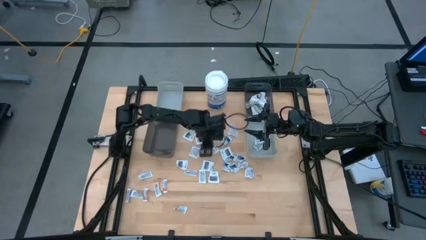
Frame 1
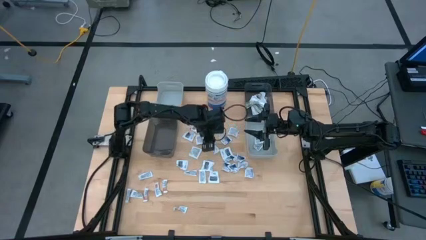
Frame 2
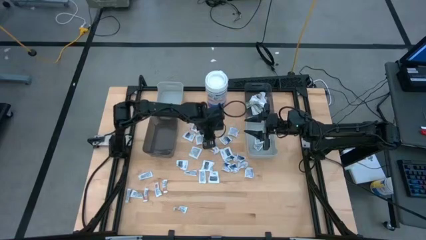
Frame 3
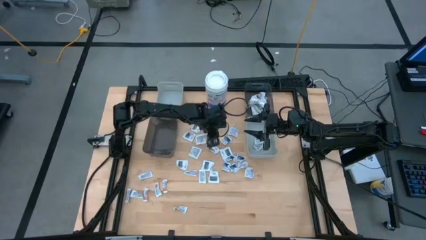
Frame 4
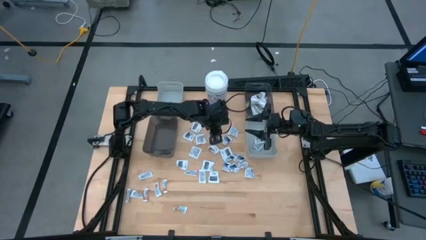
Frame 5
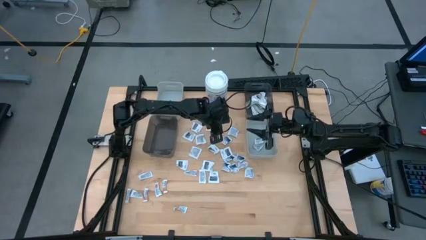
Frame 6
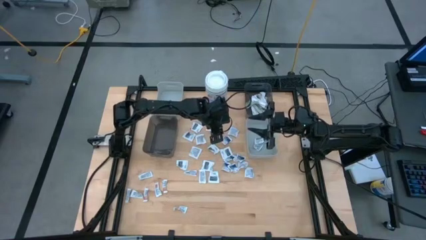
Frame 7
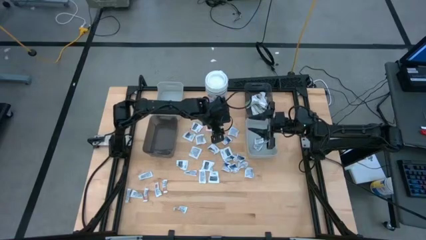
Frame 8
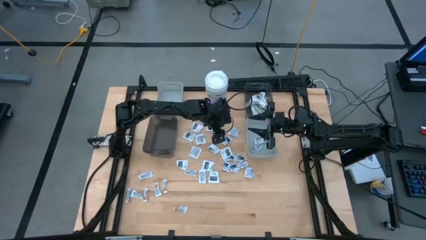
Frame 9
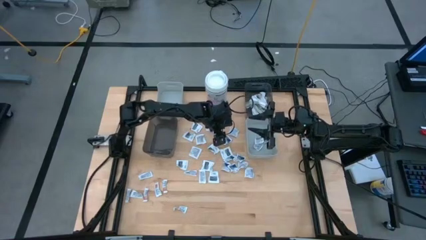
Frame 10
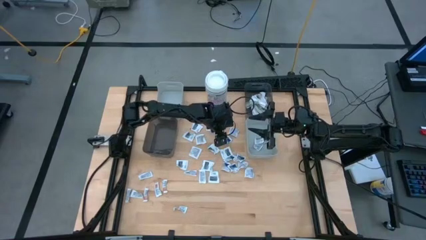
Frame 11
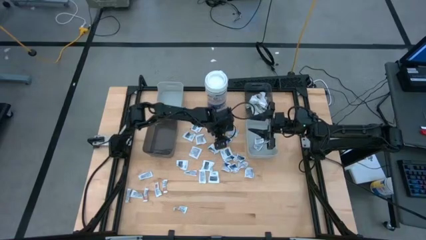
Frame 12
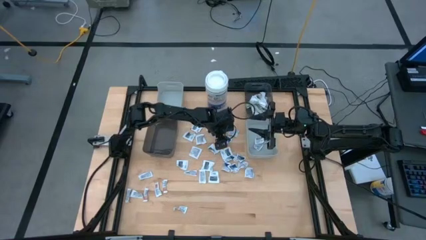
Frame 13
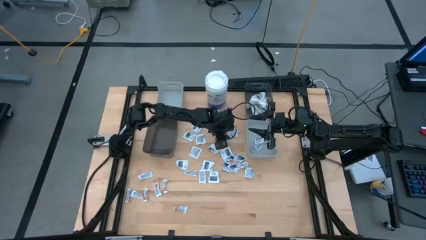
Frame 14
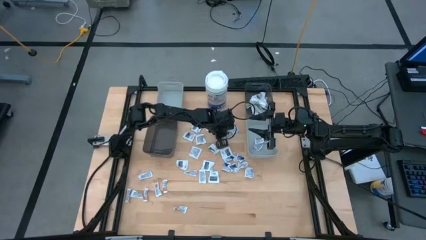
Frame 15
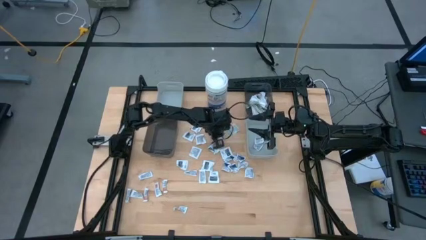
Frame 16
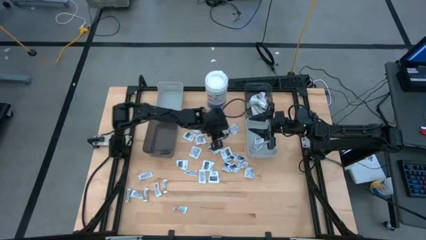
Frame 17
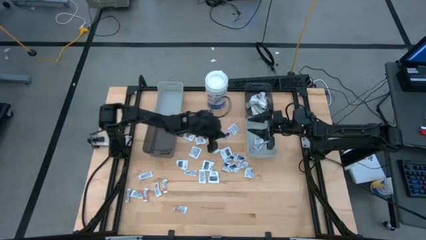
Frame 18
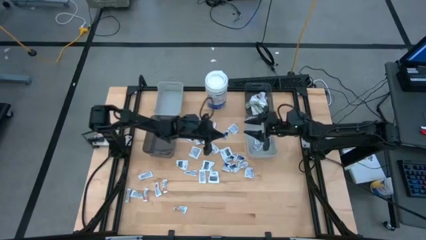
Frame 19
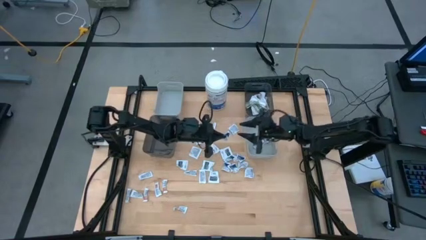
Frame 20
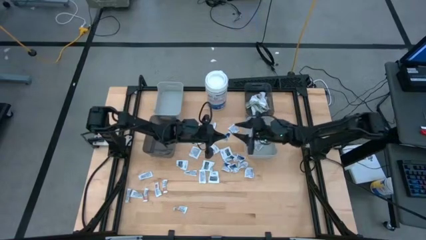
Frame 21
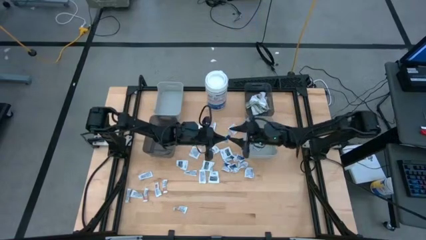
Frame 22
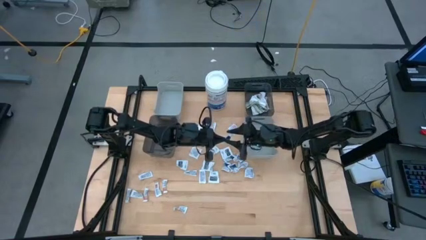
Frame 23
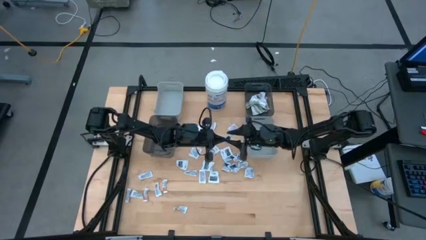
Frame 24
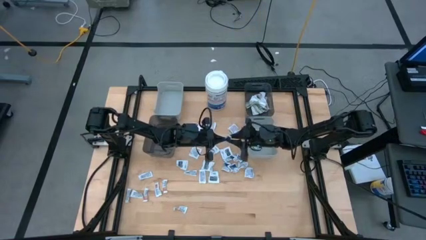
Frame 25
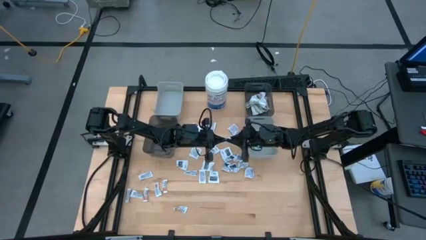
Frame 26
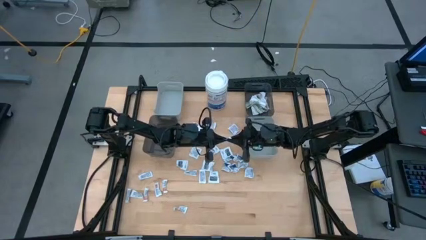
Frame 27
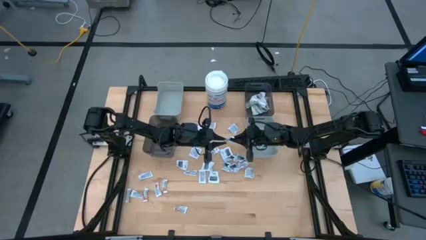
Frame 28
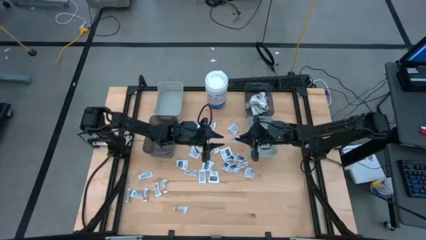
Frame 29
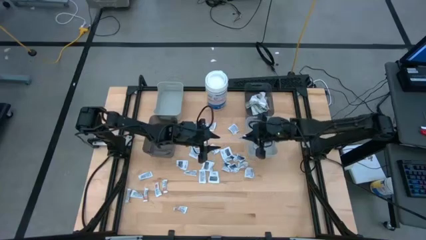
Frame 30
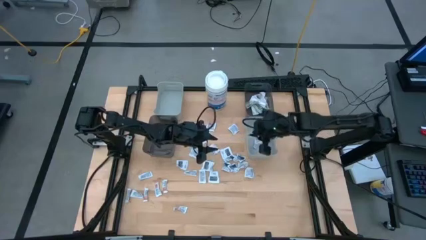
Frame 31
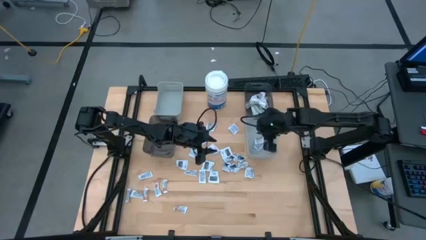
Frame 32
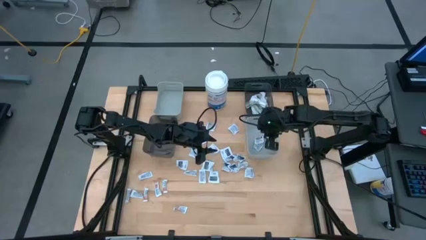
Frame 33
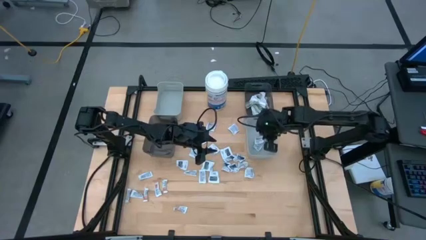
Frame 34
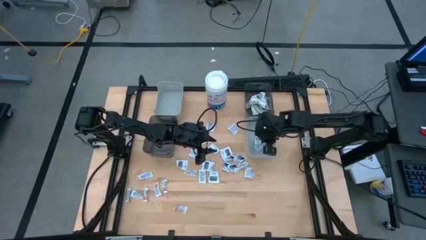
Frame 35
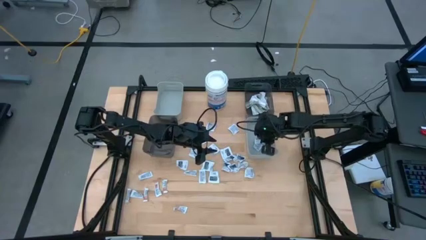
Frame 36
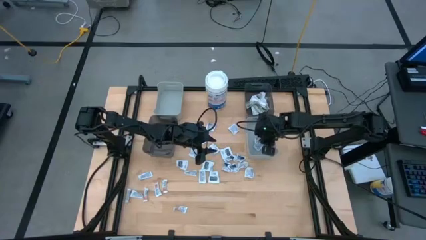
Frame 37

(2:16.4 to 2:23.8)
Task: Pick & Place First Aid Supplies
Put the blue alcohol pad into the right gray bin

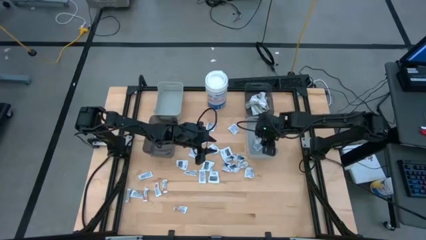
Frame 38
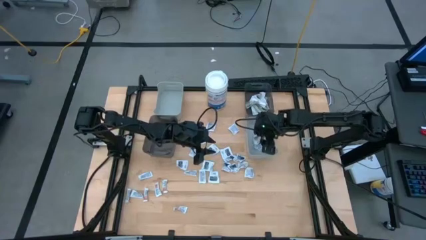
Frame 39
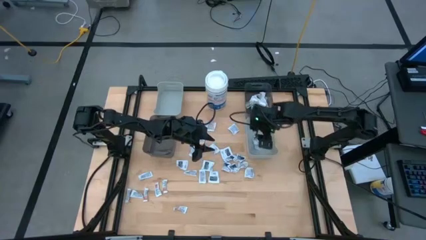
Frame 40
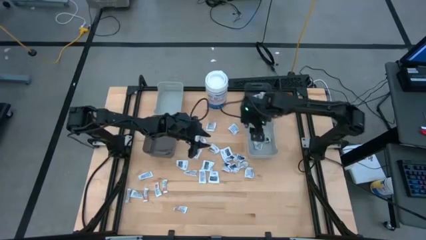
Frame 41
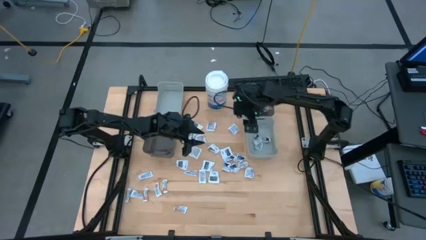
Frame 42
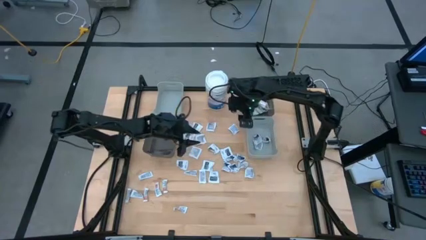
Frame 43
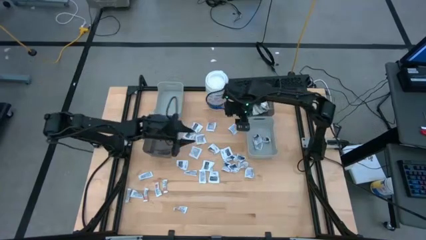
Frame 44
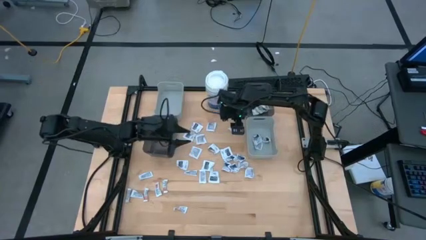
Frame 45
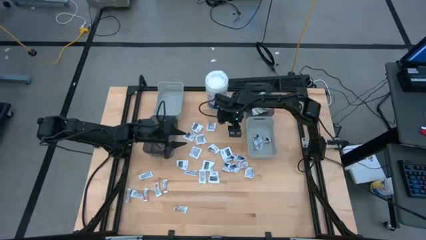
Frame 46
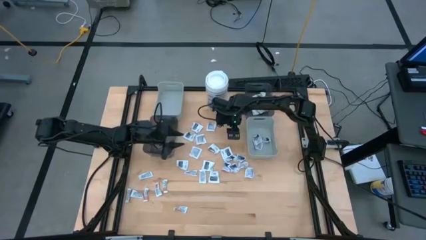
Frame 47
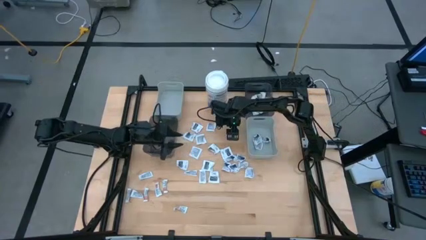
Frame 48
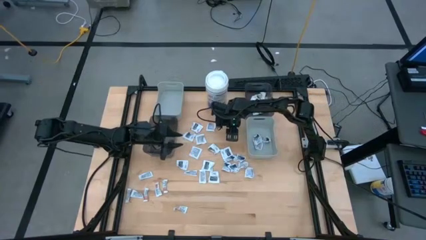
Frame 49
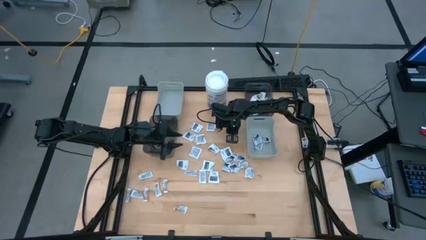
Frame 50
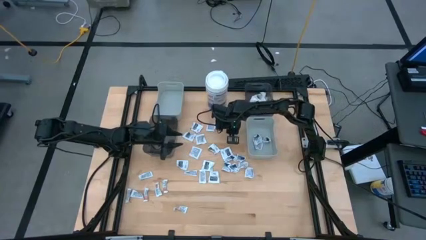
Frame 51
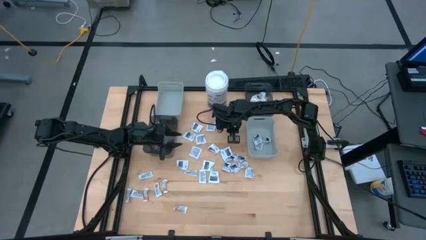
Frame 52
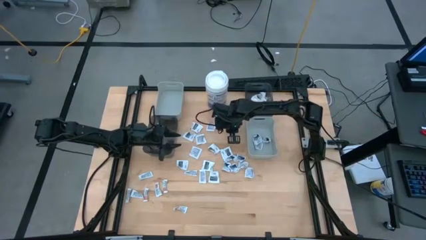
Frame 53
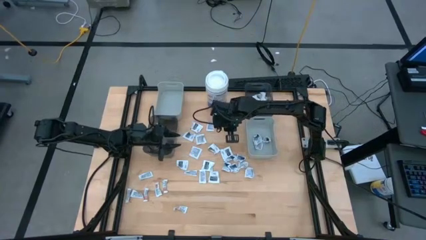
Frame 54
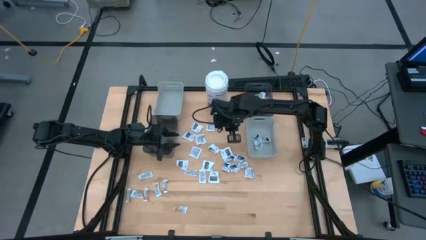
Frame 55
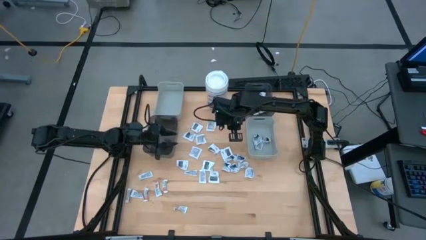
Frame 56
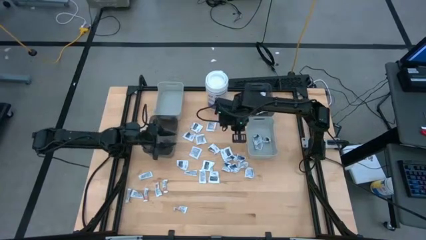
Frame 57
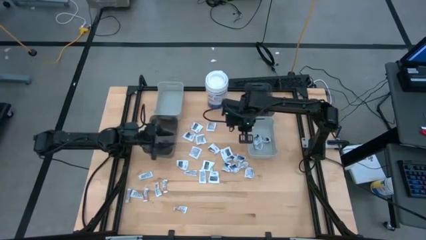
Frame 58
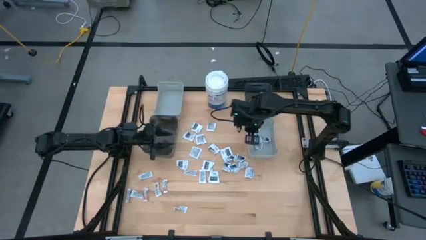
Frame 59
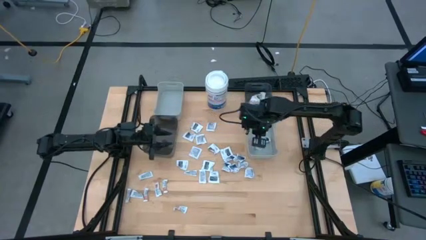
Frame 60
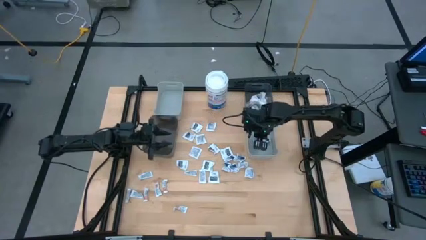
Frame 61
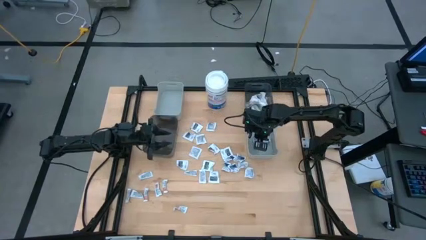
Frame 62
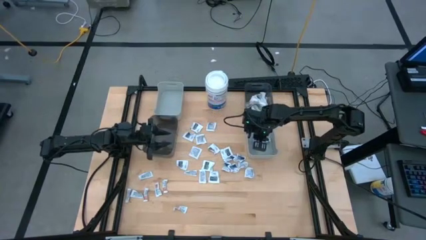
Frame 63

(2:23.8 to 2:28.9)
Put the blue alcohol pad into the right gray bin

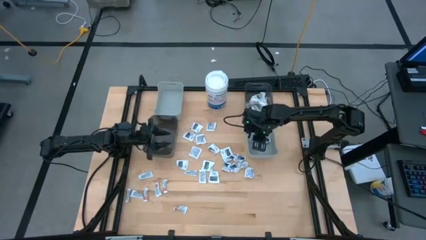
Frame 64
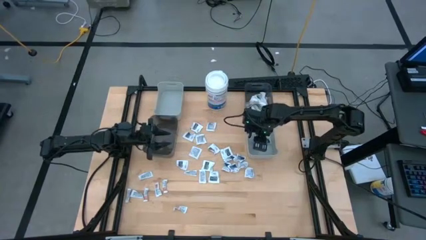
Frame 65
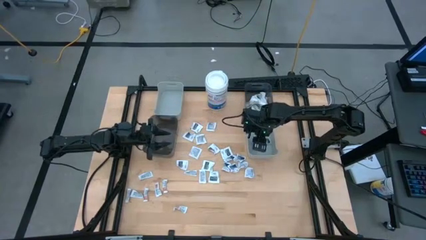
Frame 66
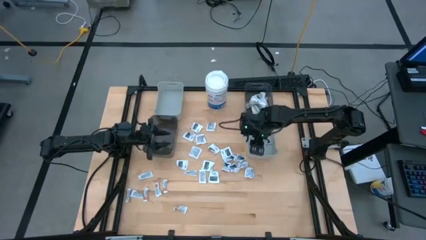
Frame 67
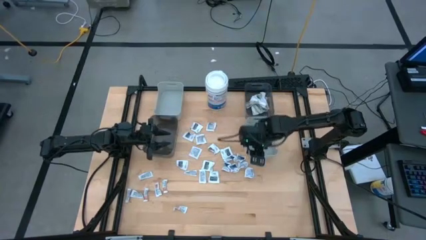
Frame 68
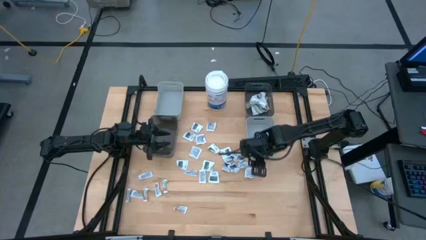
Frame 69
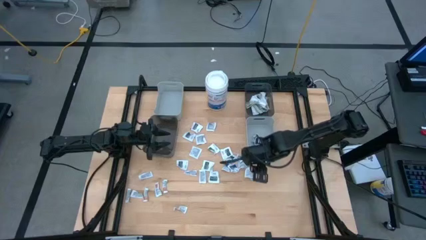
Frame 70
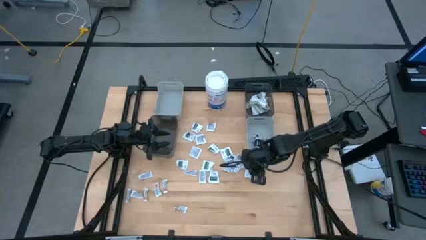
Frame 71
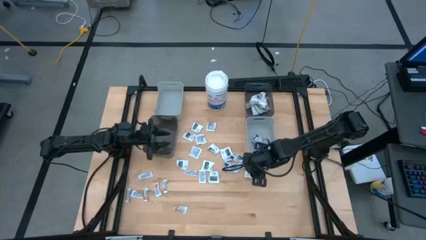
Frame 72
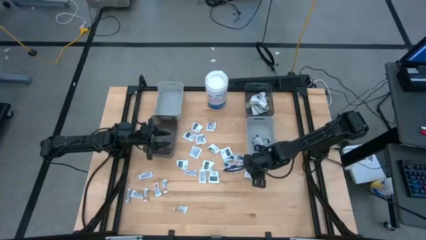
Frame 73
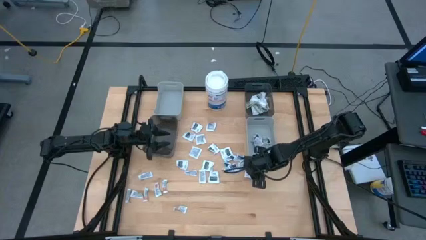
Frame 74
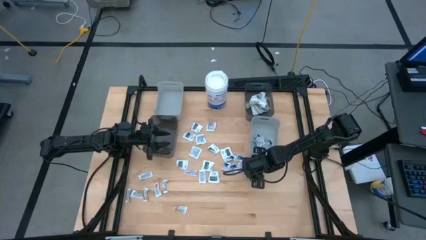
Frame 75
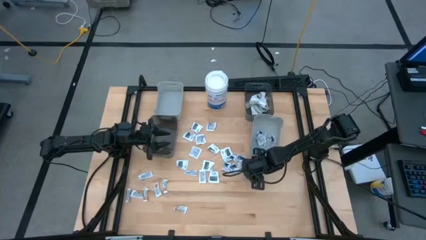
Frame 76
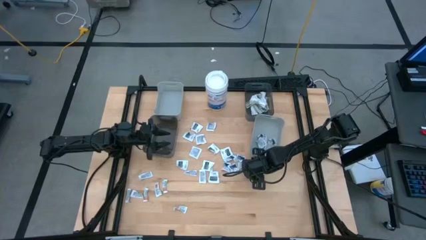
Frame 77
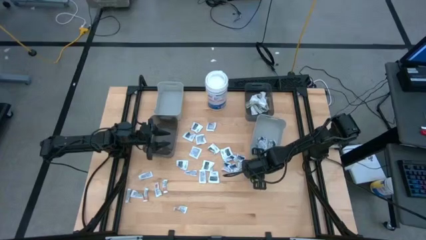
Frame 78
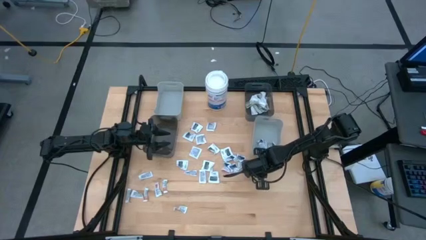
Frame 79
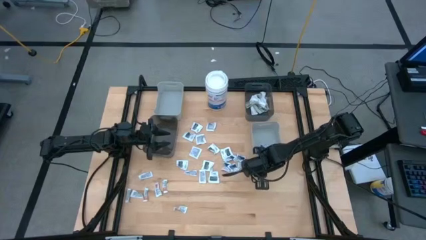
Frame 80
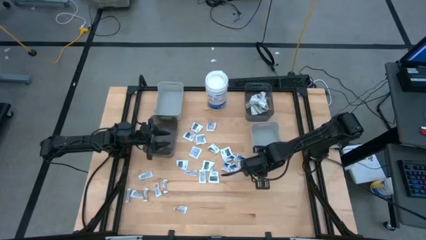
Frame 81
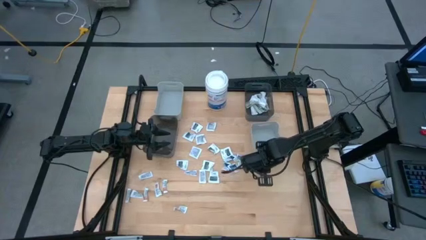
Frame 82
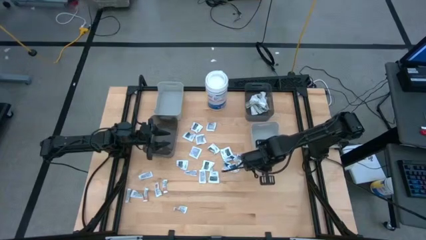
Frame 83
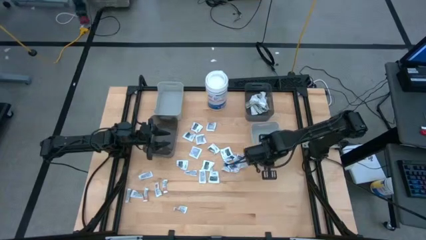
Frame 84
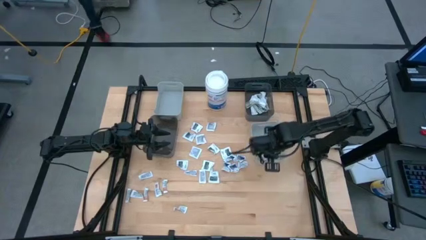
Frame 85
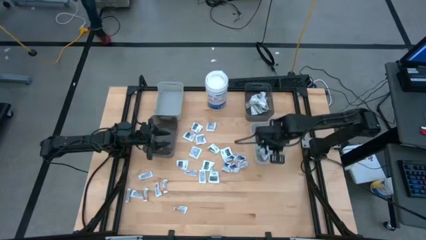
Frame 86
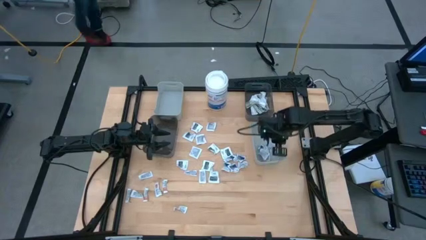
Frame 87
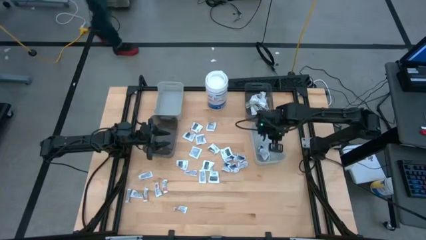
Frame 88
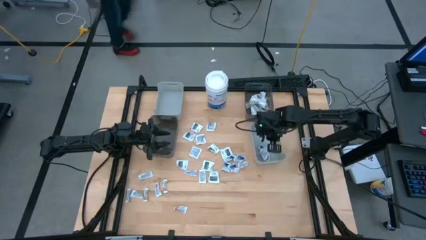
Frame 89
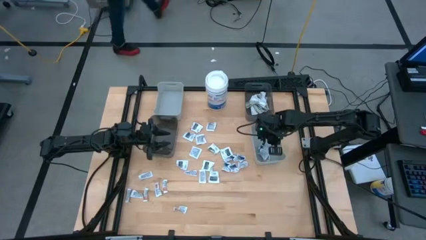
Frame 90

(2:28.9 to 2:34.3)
Put the blue alcohol pad into the right gray bin
